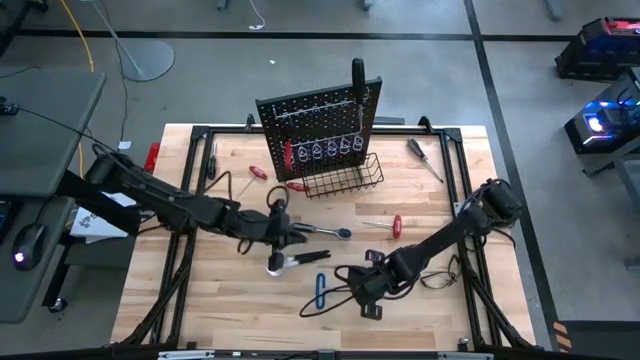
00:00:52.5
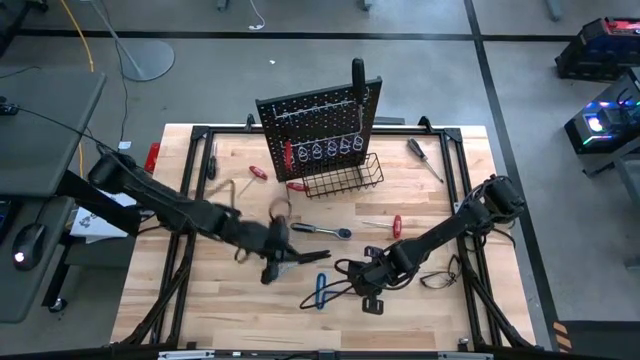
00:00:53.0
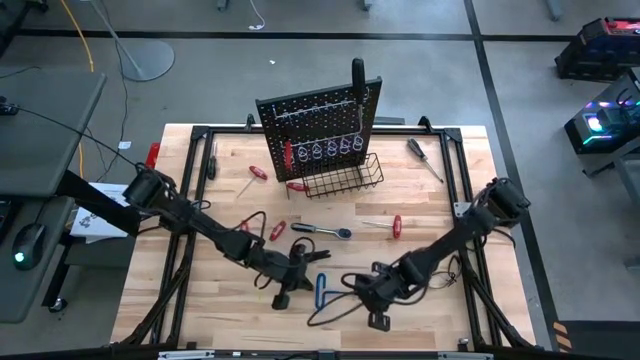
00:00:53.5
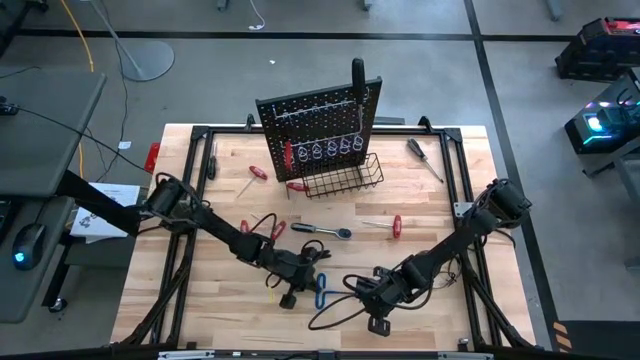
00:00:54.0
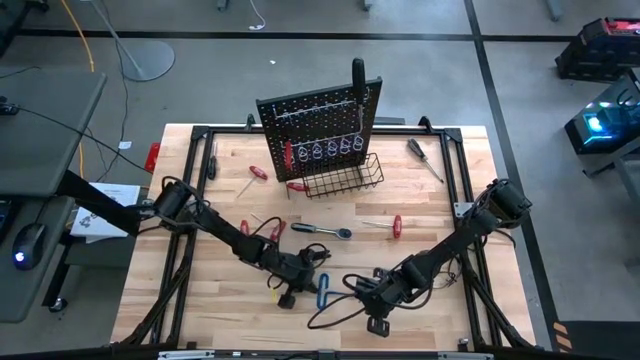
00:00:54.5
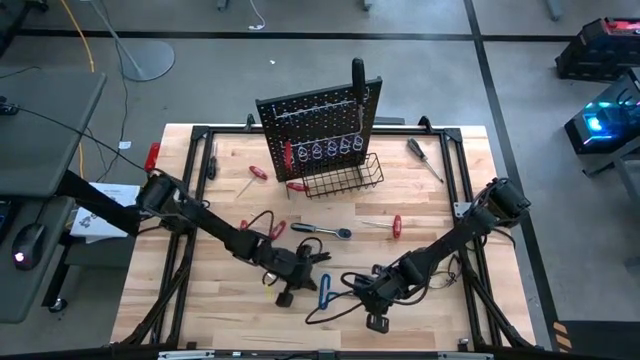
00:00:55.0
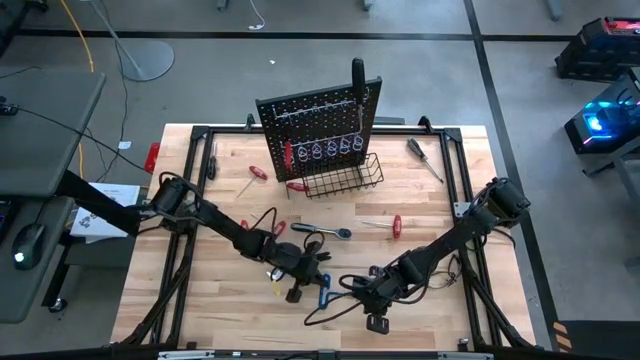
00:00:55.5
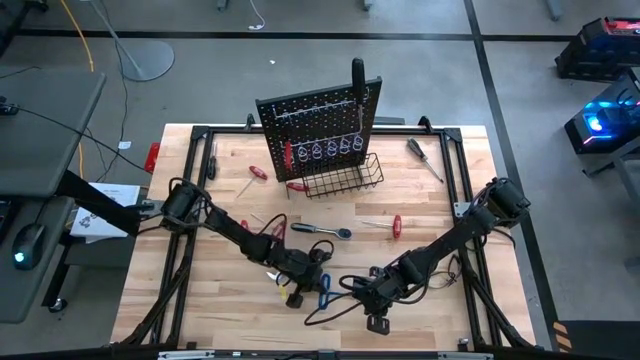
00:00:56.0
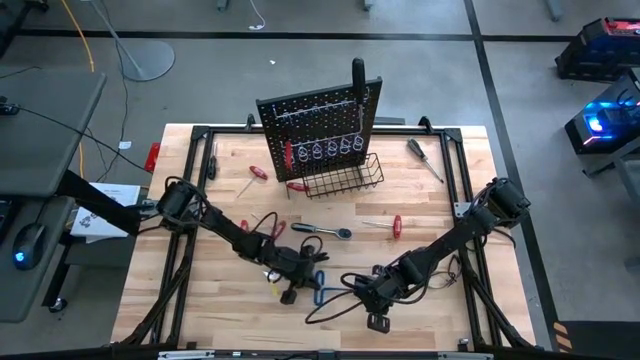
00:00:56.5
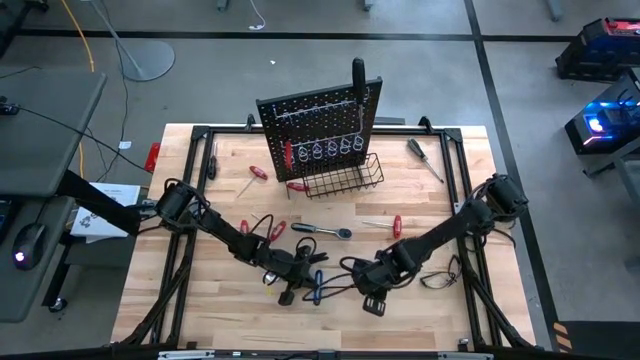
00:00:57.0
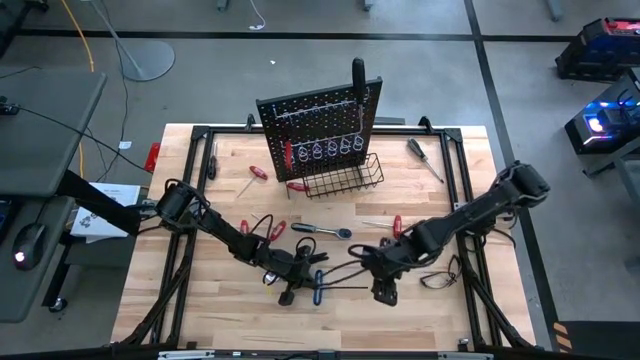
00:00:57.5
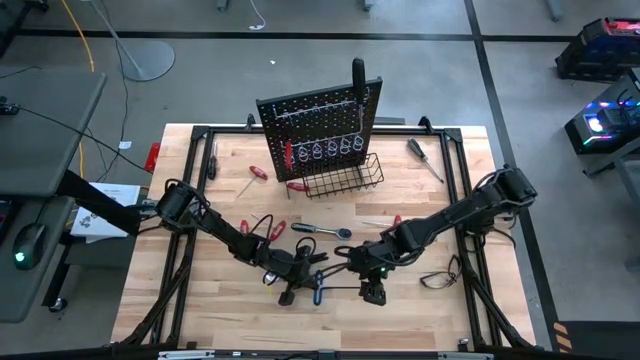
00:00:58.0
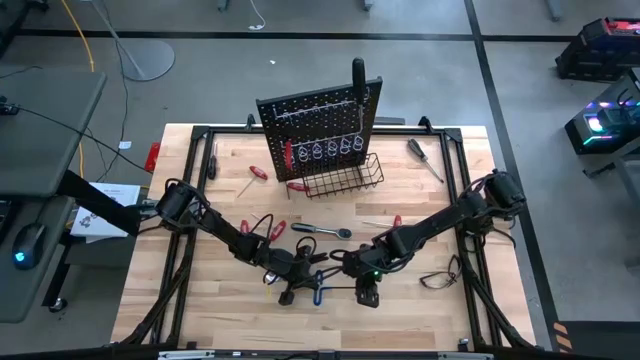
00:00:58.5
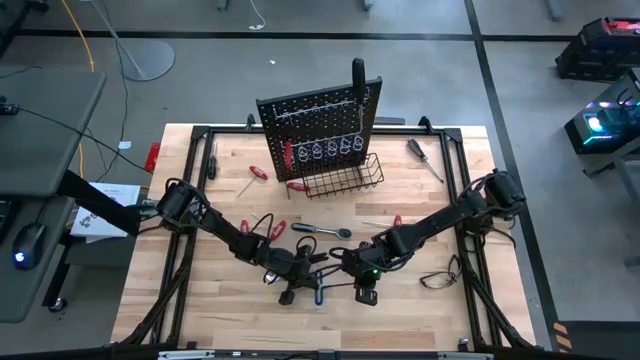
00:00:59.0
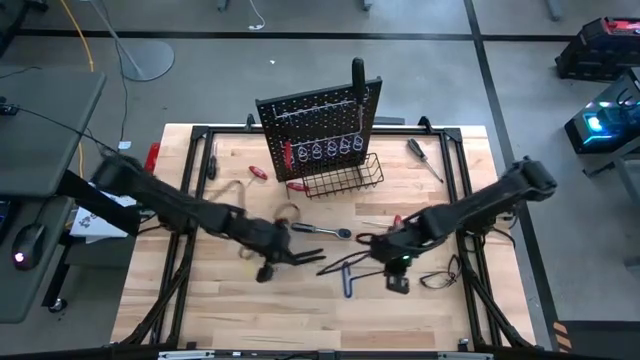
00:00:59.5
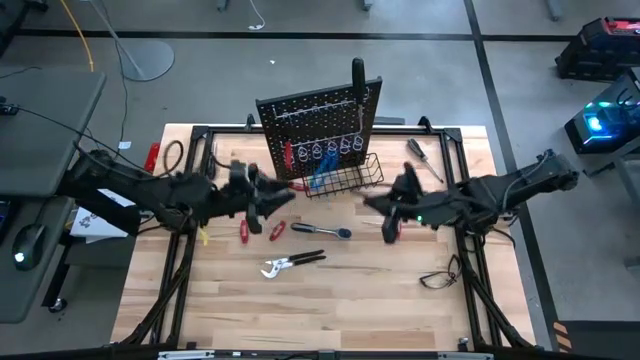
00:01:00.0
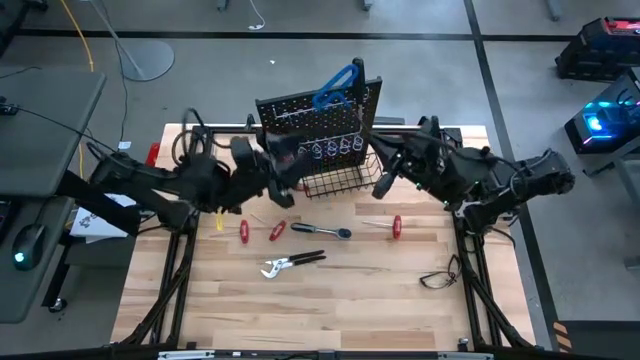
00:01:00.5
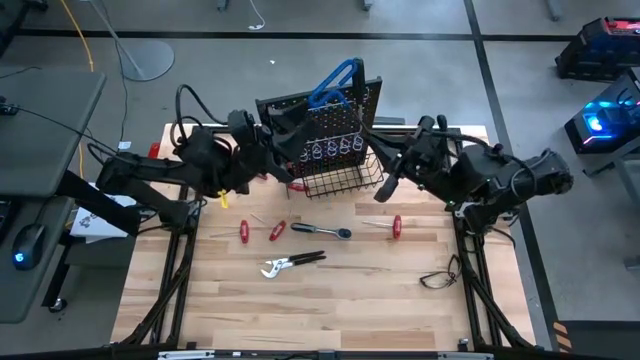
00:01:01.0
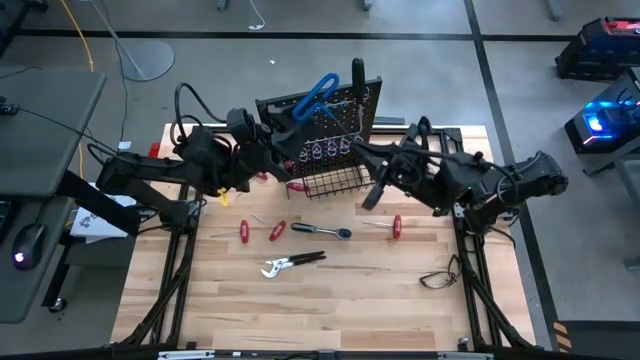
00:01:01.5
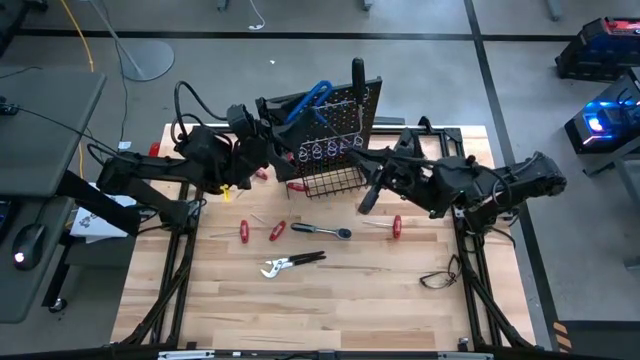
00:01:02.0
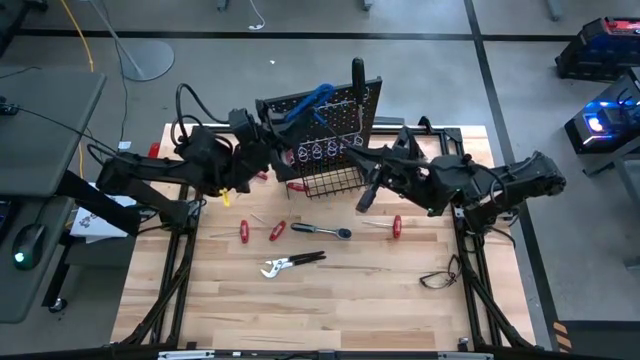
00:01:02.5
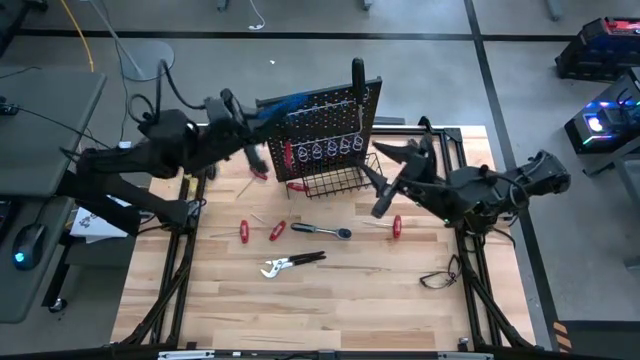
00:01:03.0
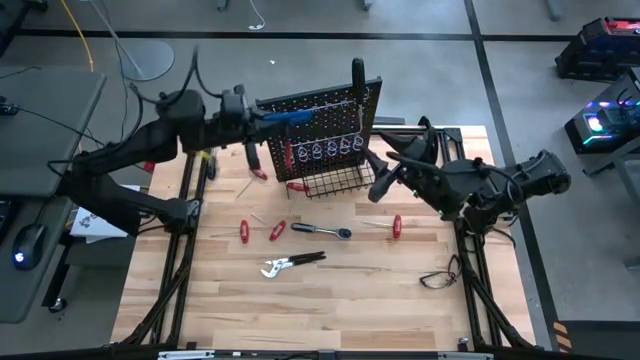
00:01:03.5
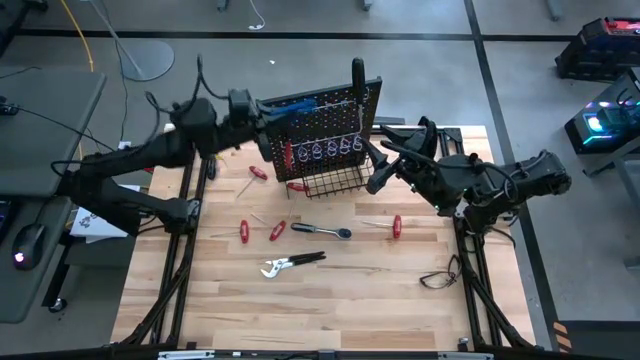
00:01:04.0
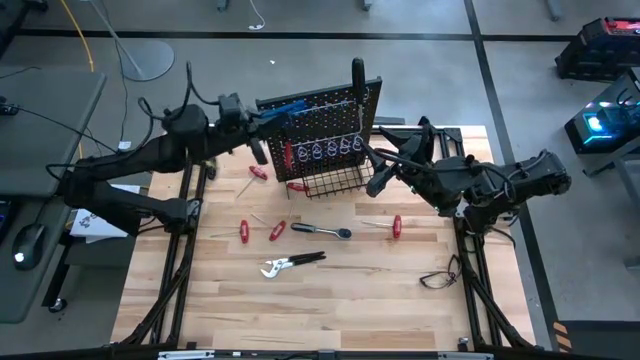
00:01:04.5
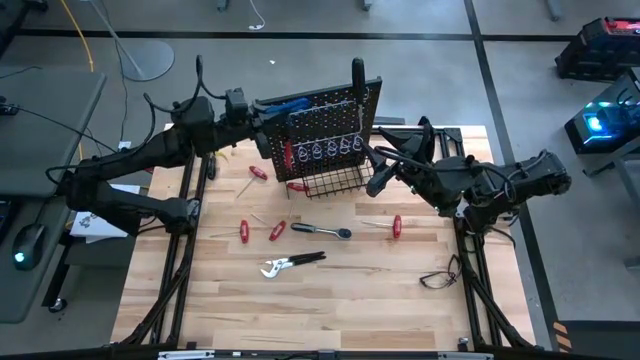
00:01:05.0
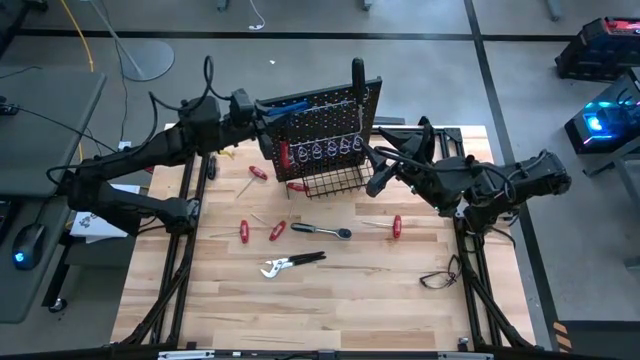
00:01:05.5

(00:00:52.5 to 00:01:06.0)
Task: Hang tools onto peg board
Hang the blue pick tool on the peg board

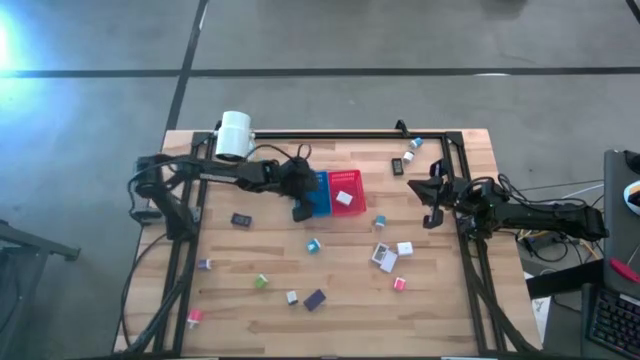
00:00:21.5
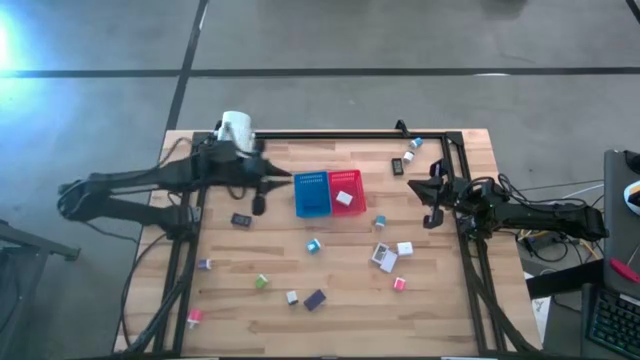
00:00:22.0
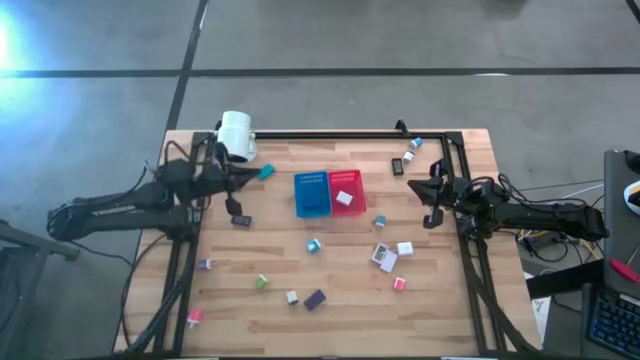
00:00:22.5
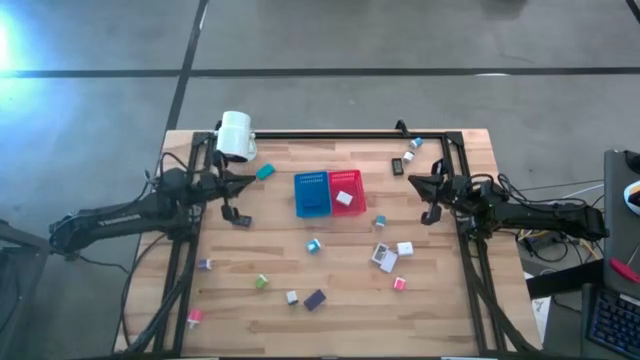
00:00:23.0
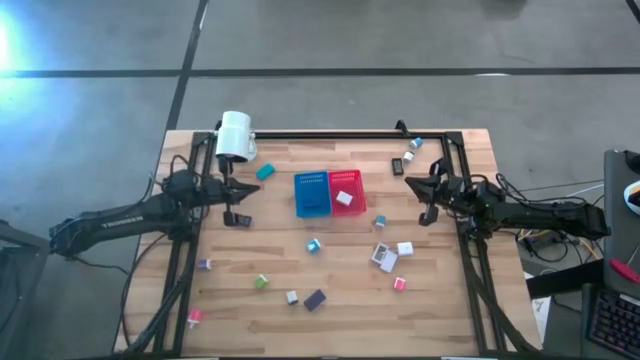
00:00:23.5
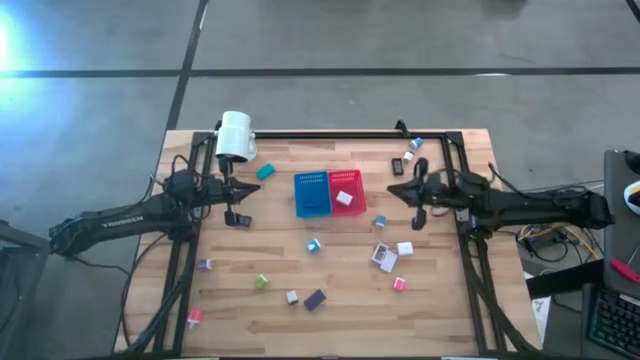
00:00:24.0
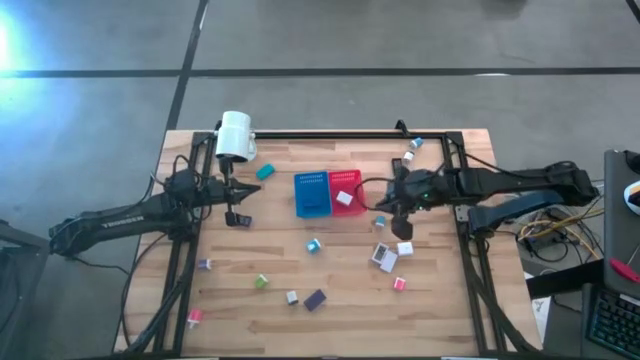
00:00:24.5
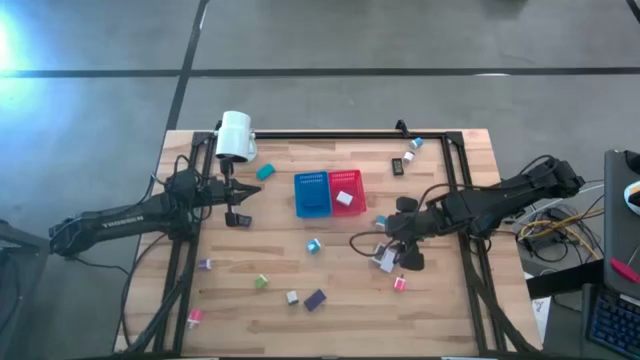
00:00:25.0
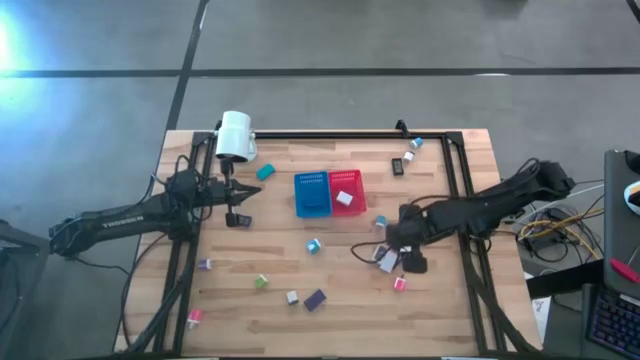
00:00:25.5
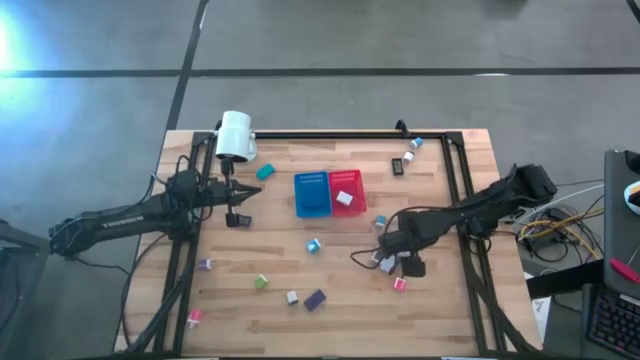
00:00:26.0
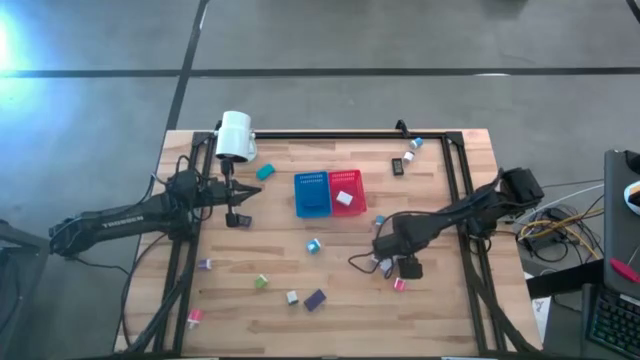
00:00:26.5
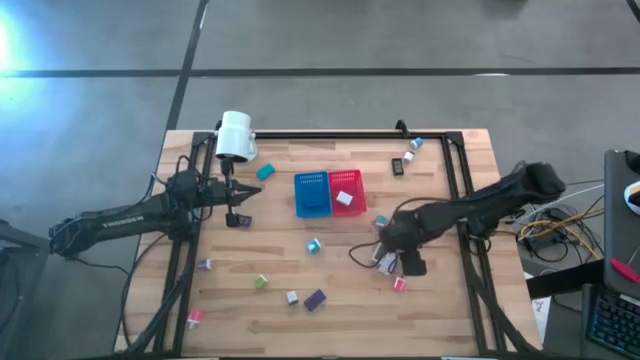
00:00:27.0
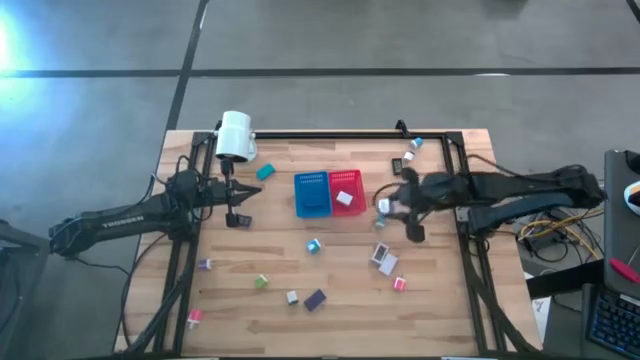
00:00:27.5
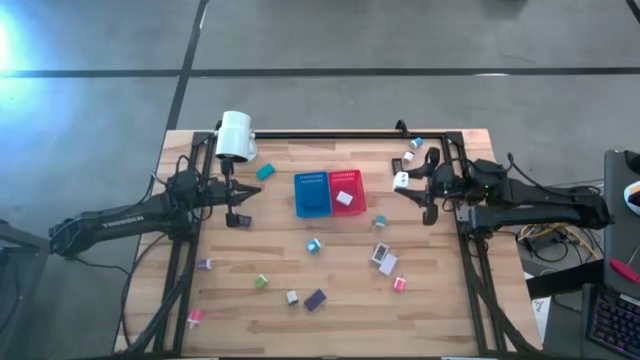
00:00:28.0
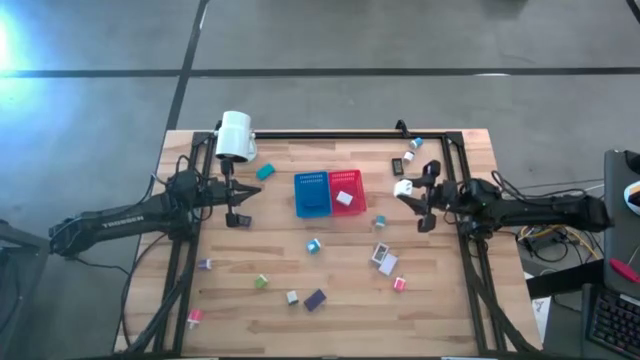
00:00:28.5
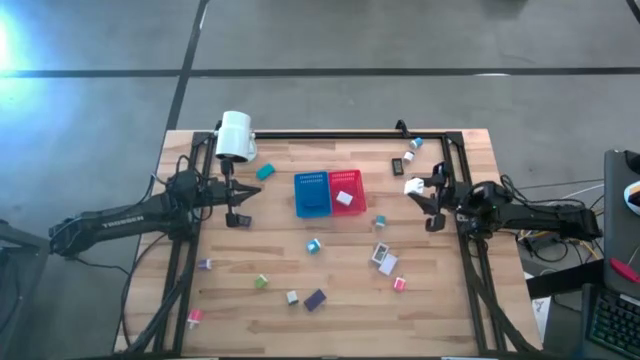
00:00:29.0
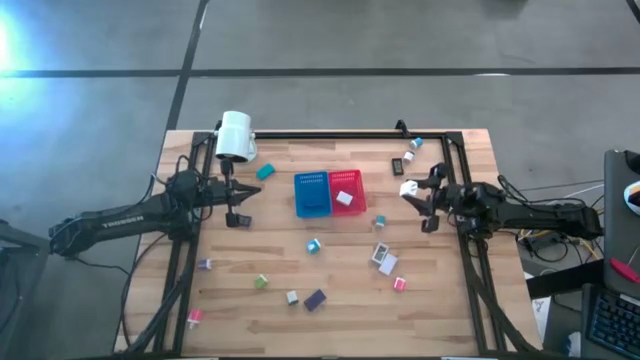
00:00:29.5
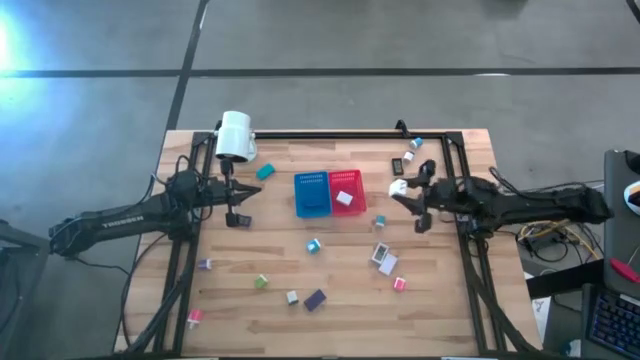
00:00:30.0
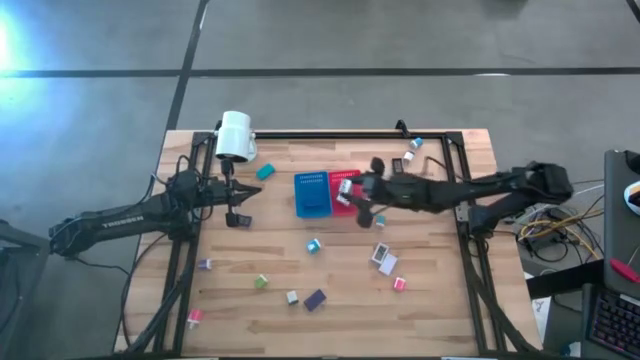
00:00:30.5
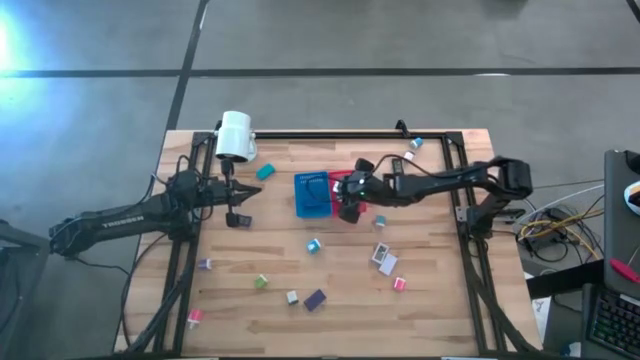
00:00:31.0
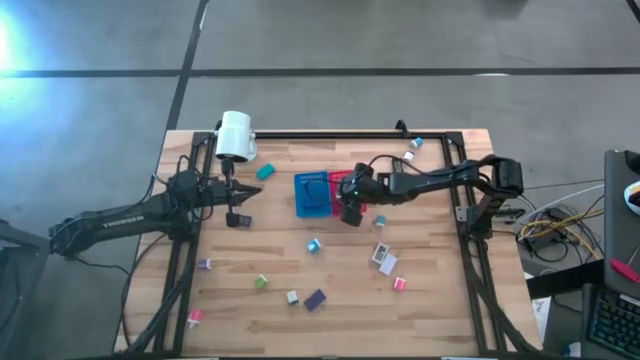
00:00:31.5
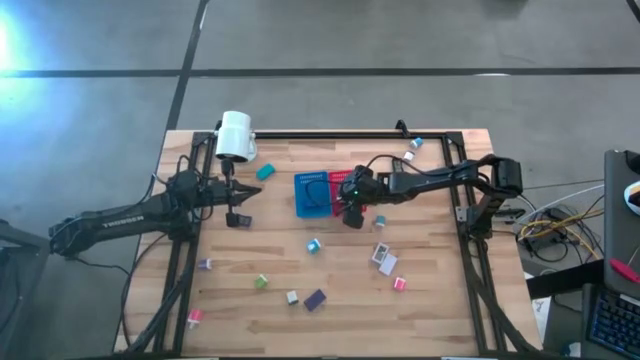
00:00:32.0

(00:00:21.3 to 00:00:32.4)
Task: Pick & Place Office items
Put the white charger adapter into the red bin
